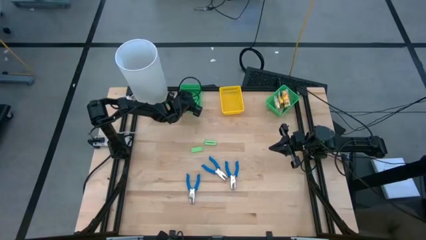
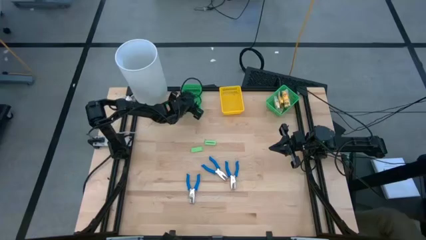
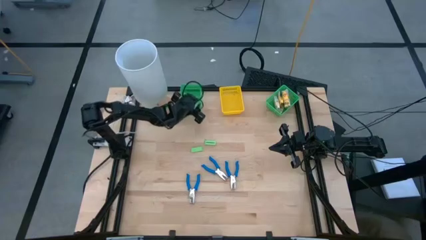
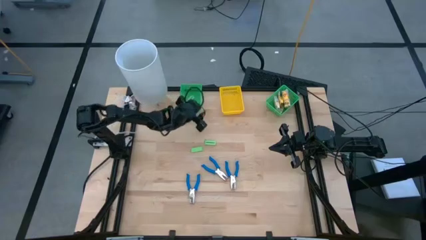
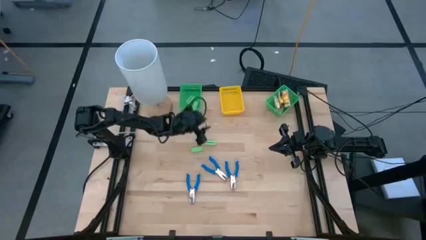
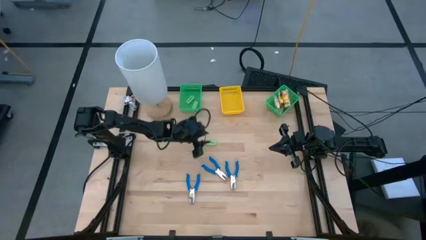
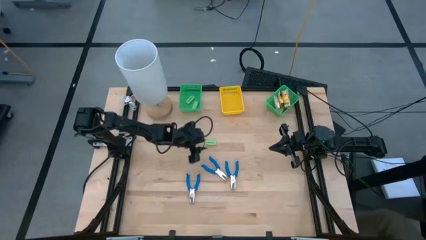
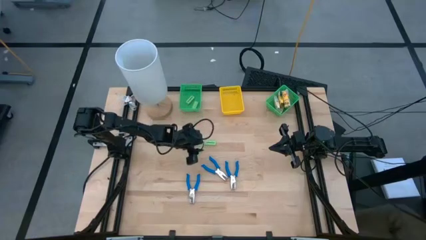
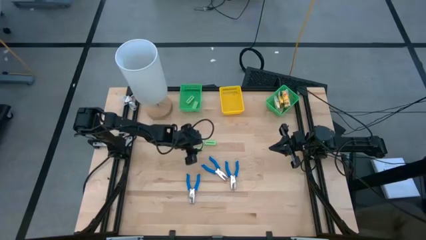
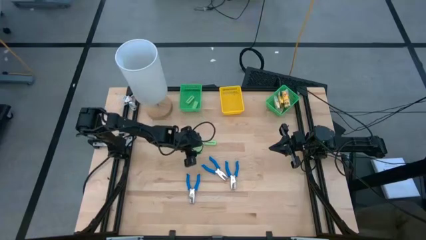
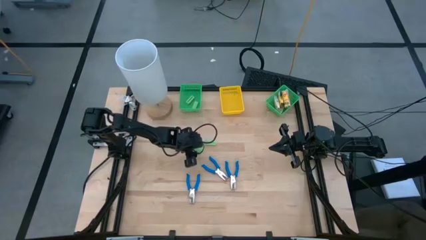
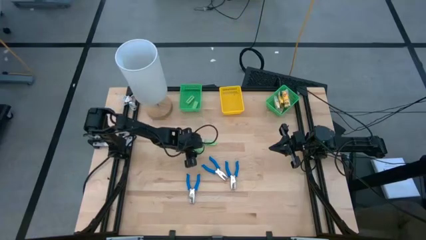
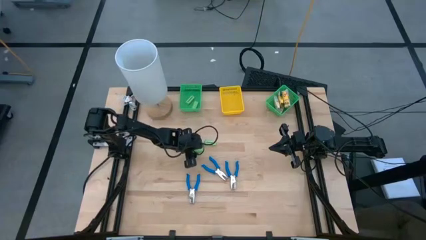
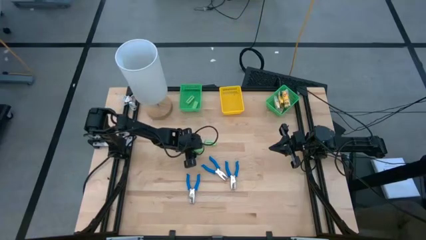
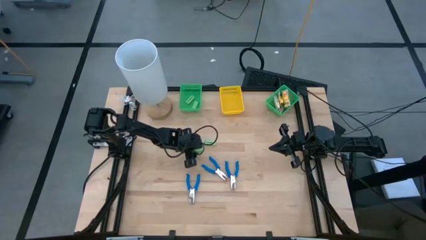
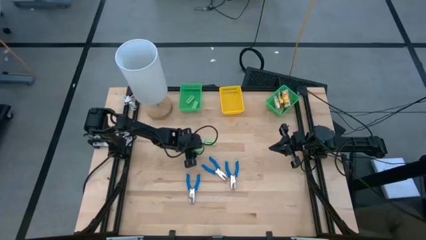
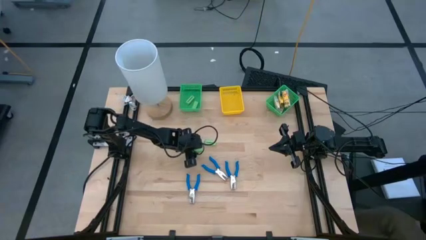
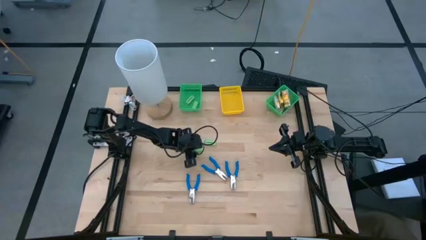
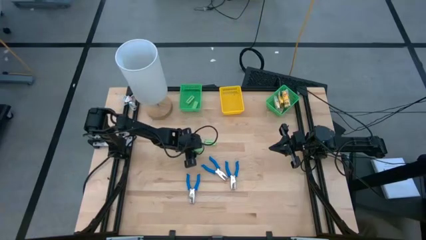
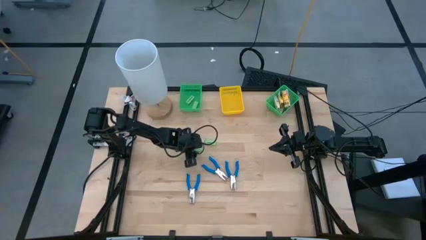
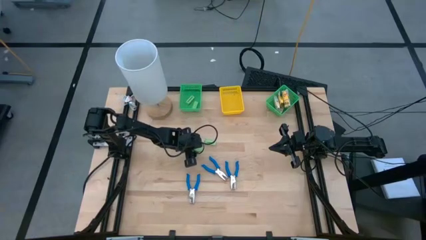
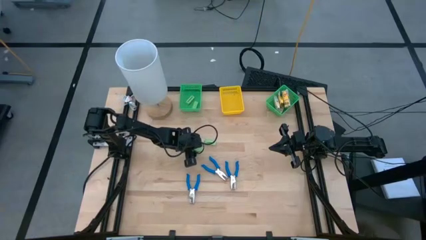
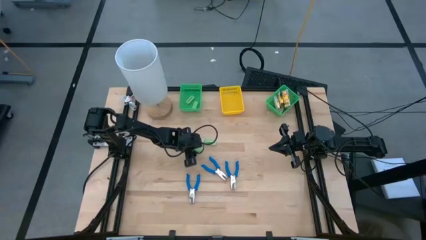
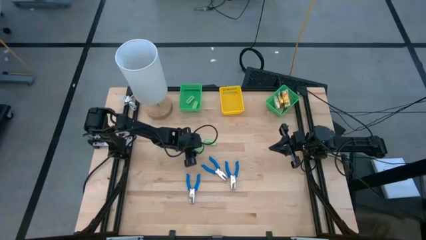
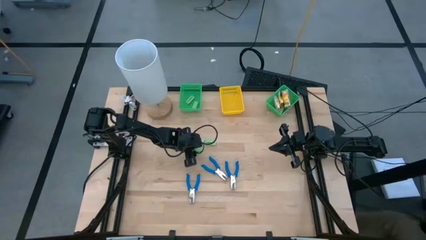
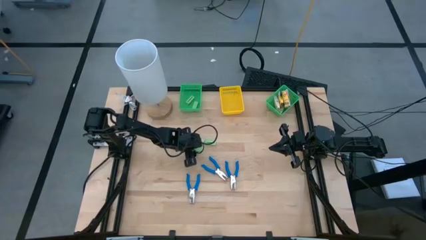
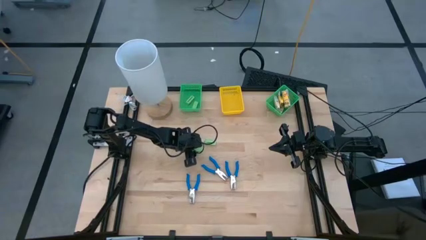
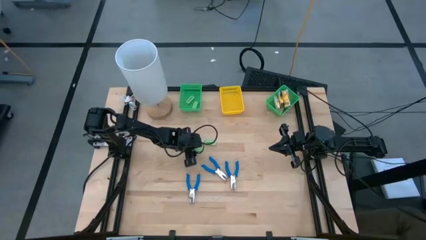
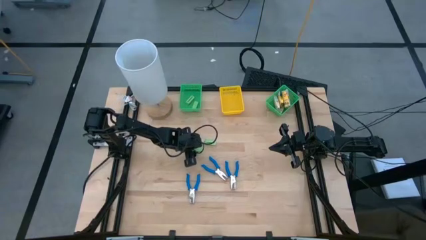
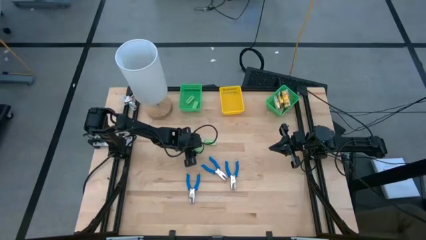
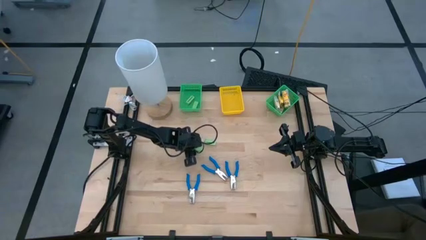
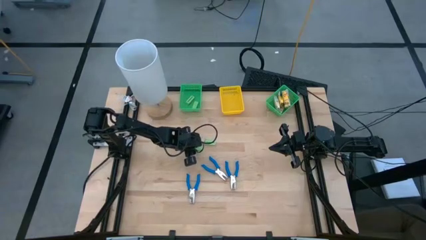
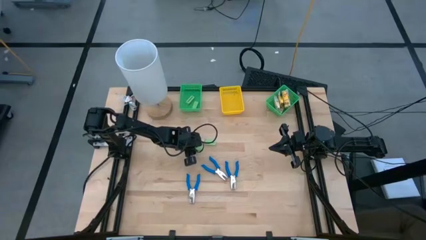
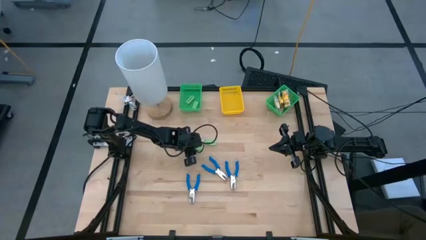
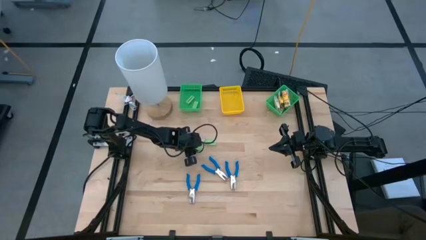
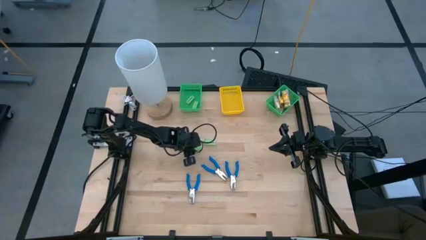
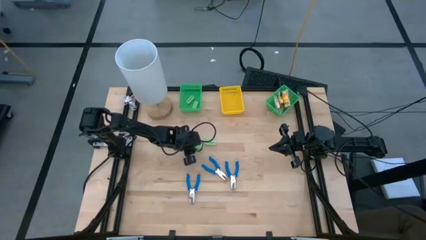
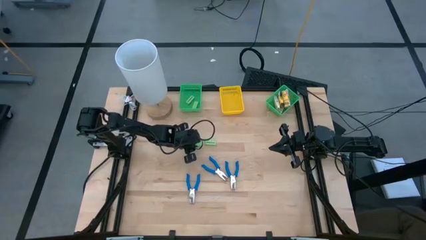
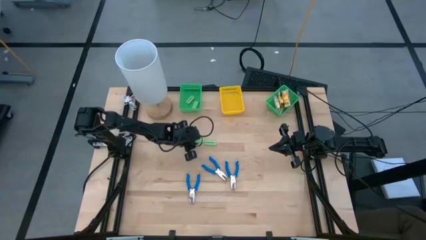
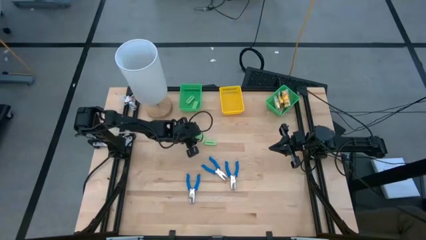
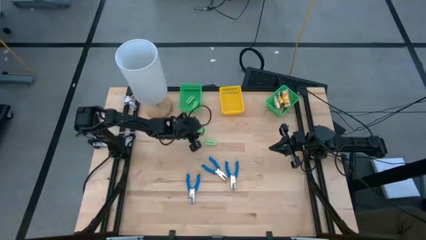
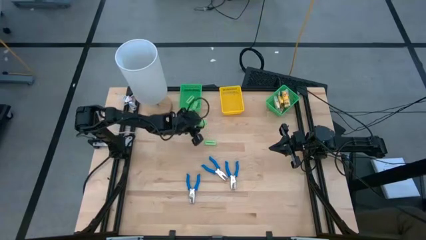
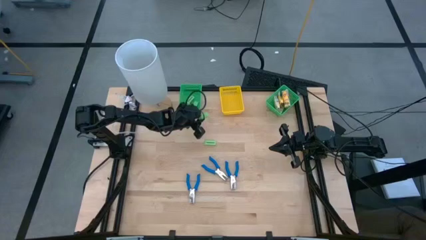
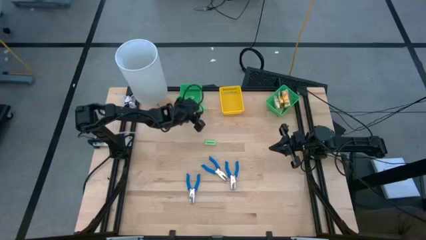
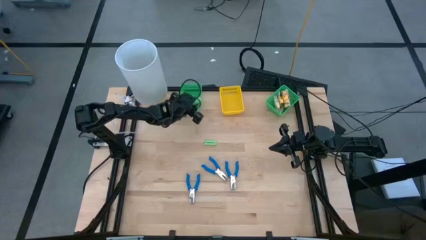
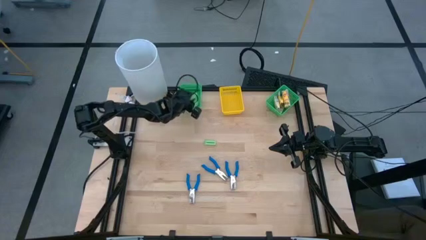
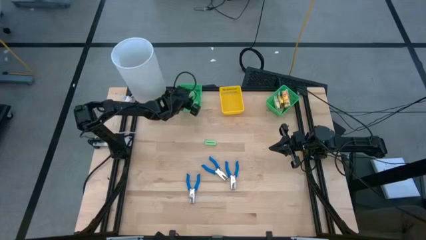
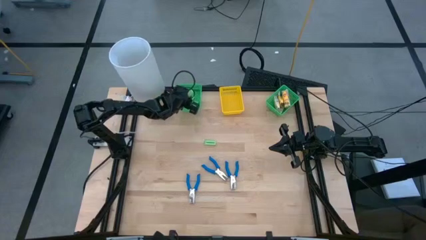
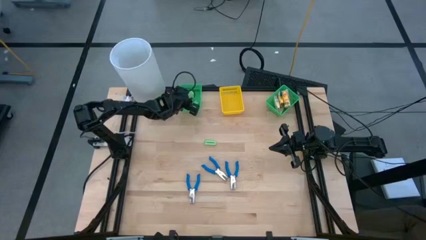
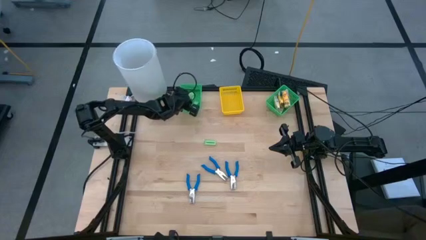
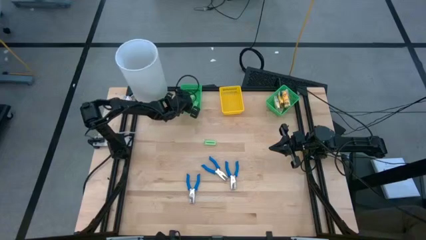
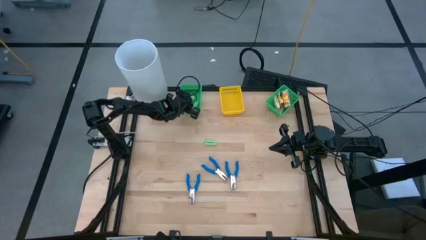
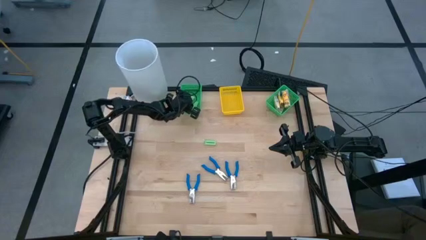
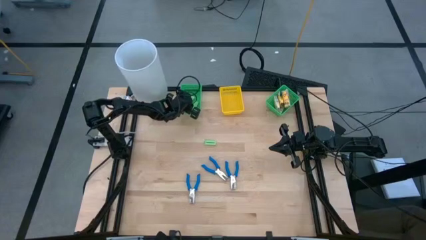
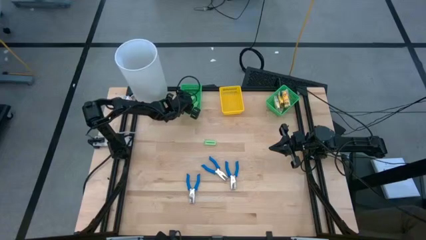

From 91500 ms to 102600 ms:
Task: Pick & Place School Supplies
Put the green eraser into the left green bin

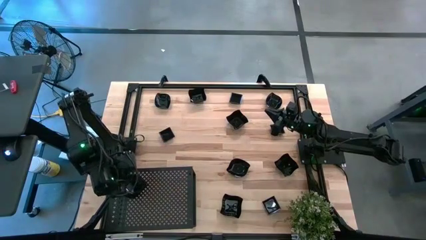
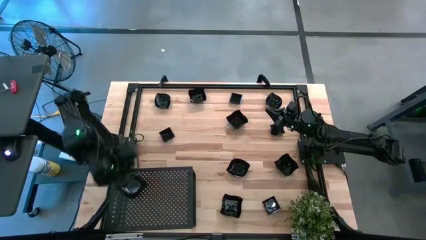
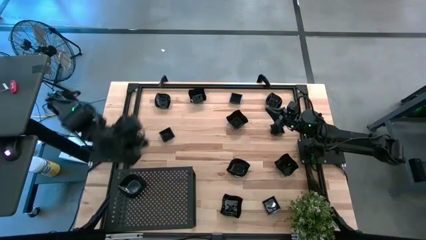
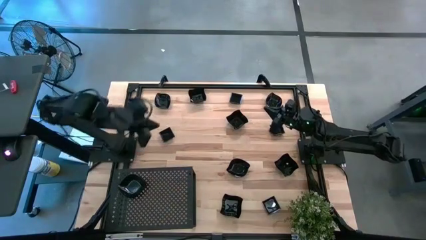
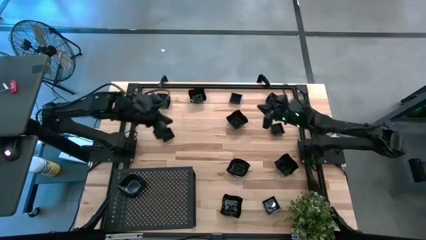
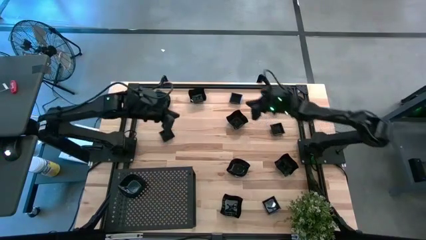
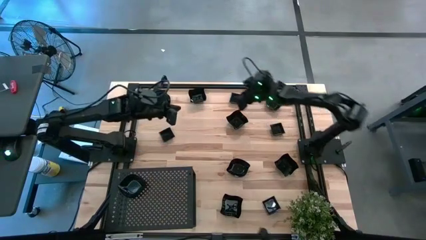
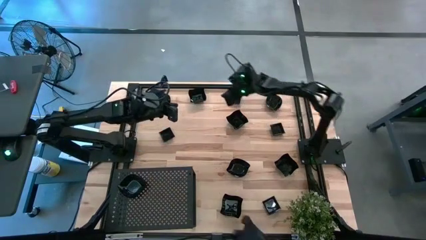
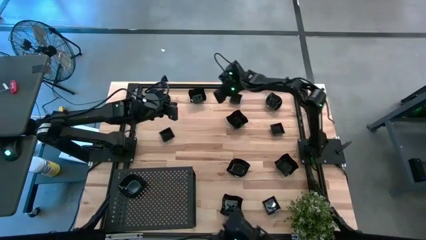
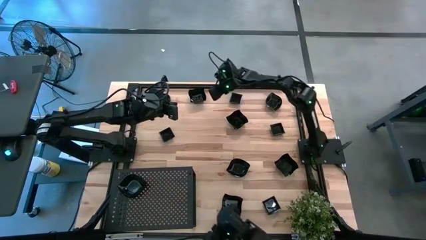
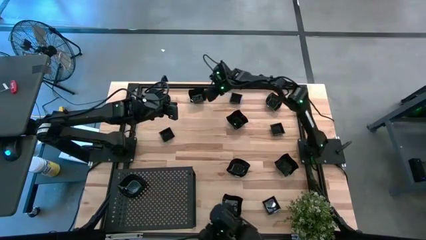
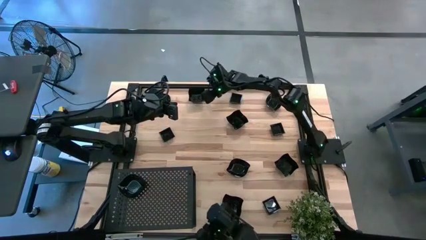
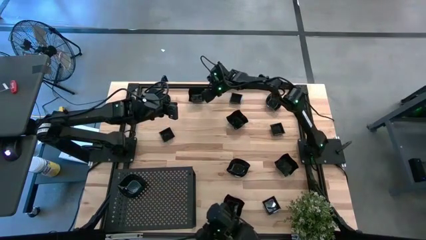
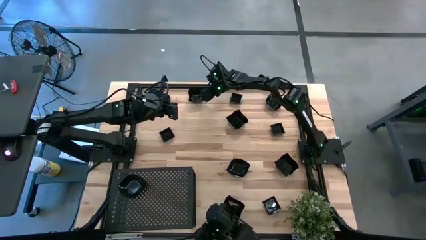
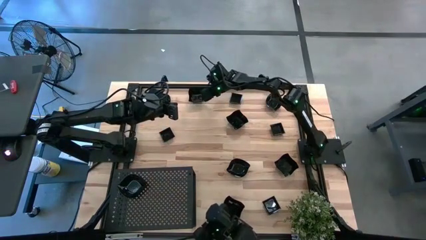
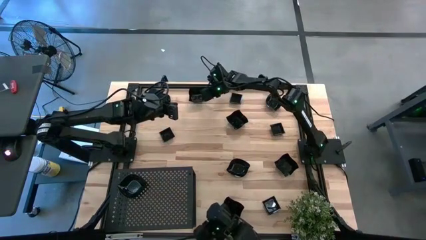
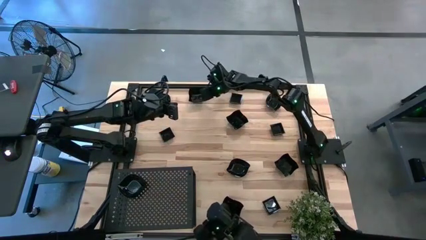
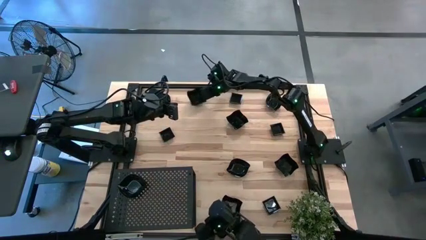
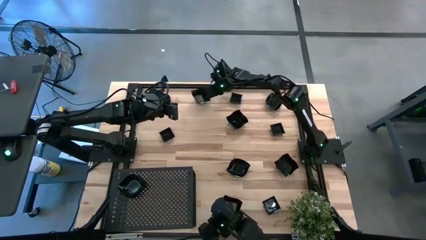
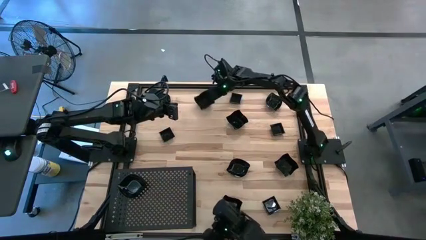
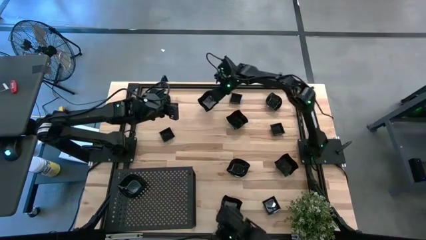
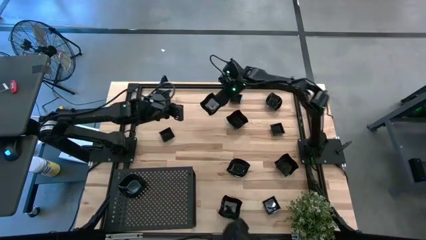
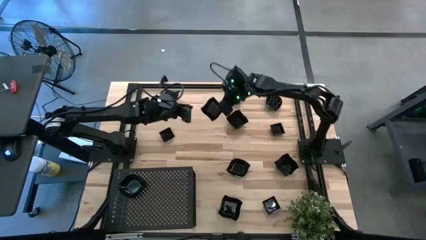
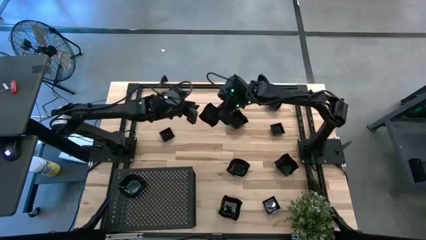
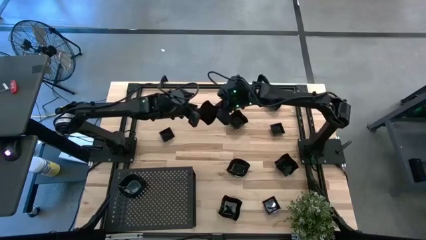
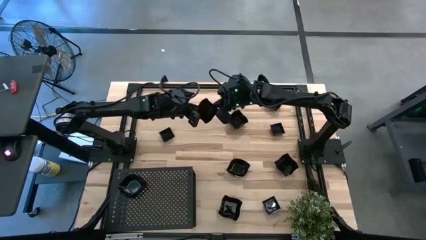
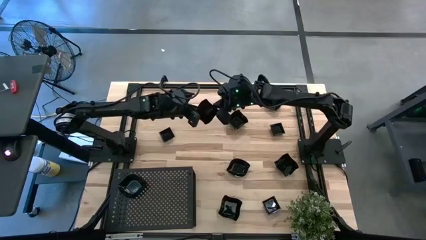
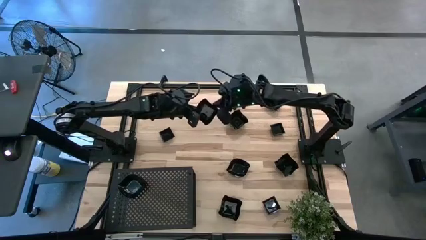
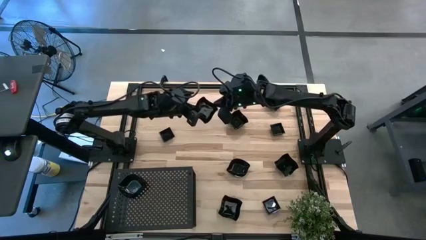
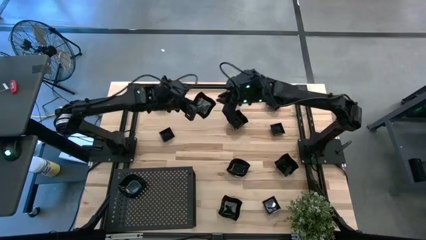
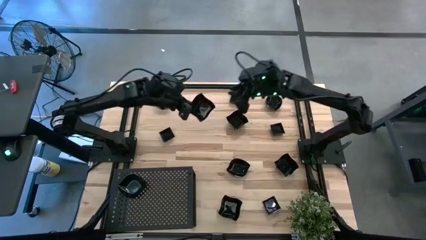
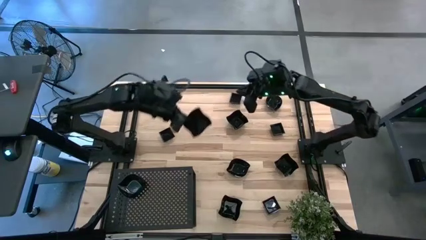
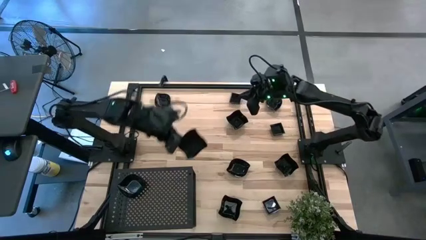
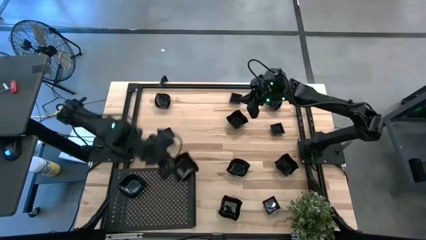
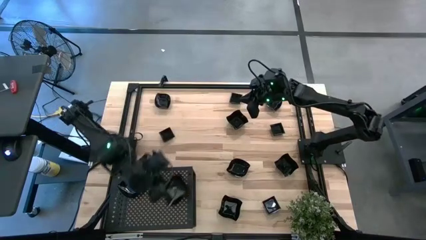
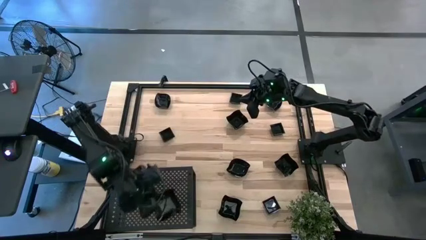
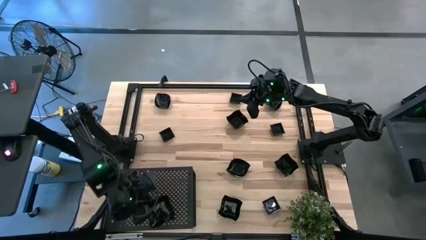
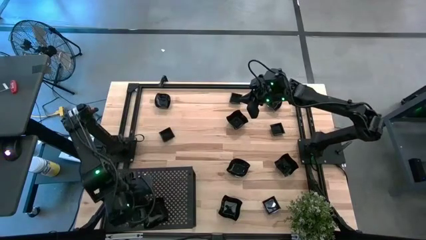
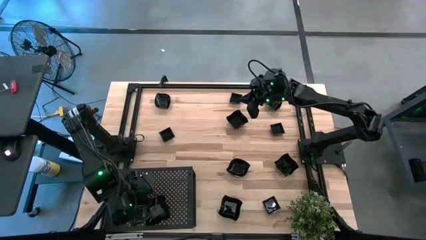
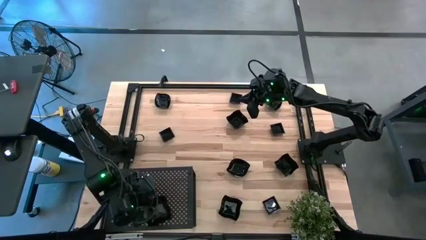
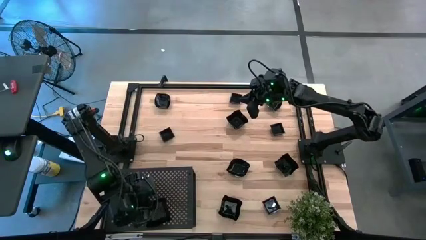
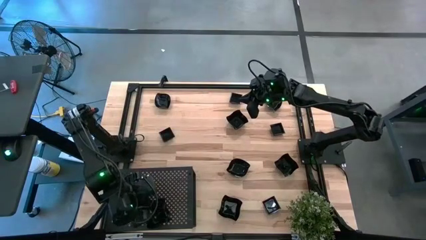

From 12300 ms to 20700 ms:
Task: Pick & Place Mini shaped plates
Put the distorted square plate on the shelf
